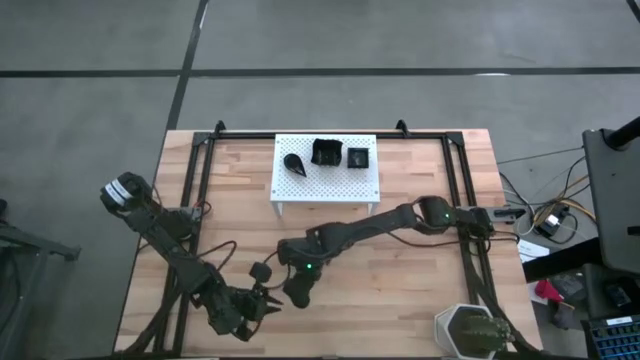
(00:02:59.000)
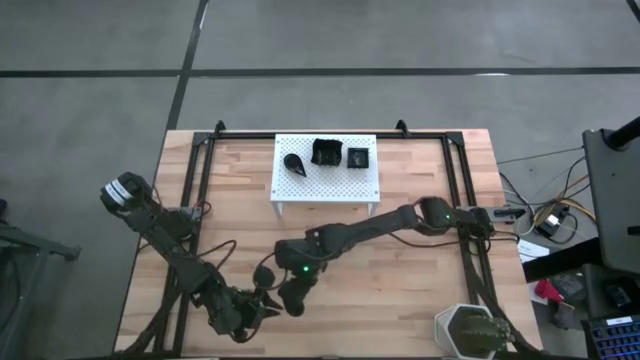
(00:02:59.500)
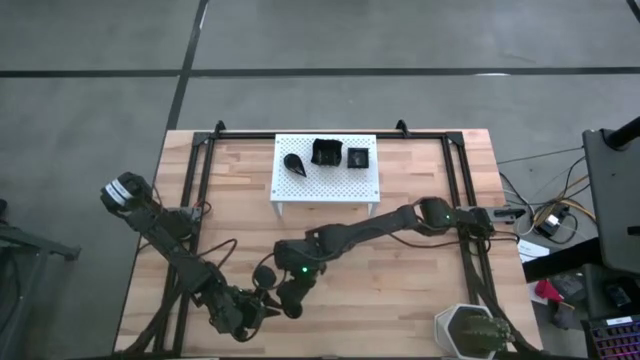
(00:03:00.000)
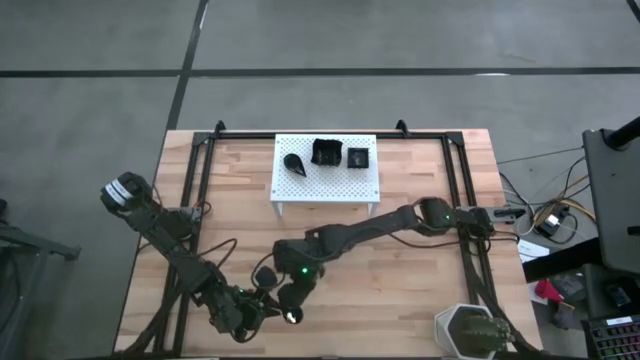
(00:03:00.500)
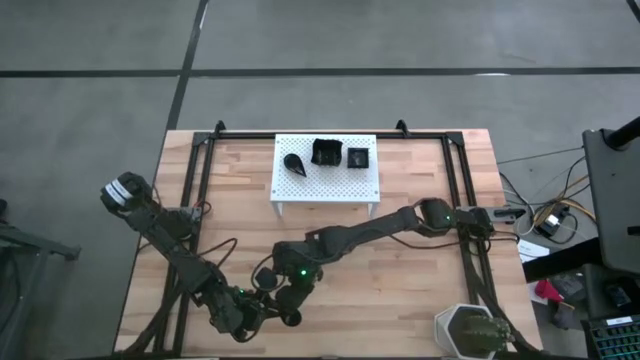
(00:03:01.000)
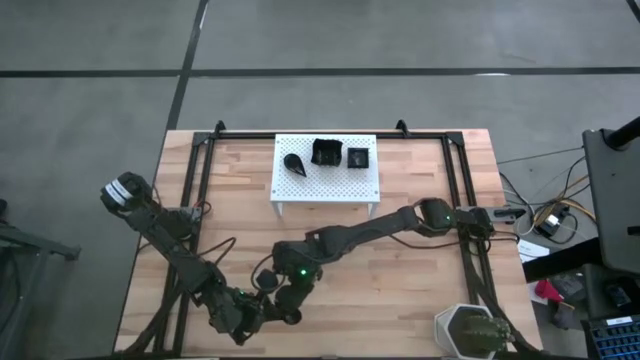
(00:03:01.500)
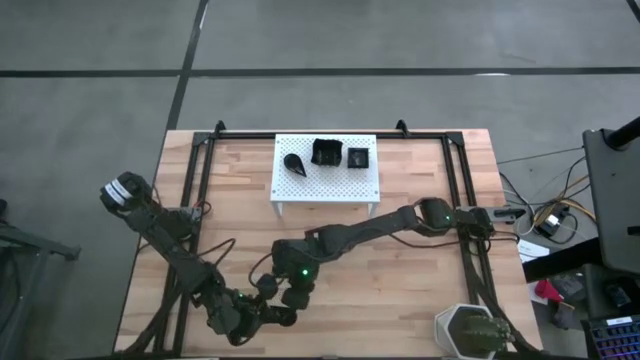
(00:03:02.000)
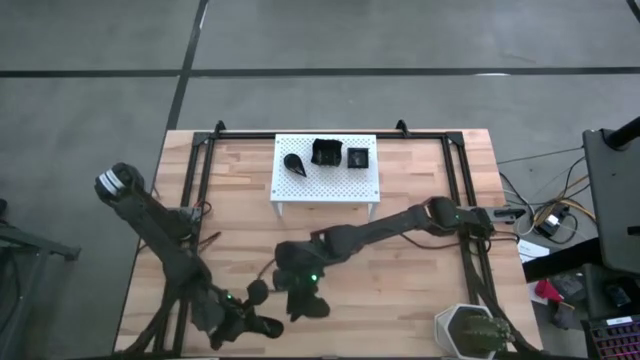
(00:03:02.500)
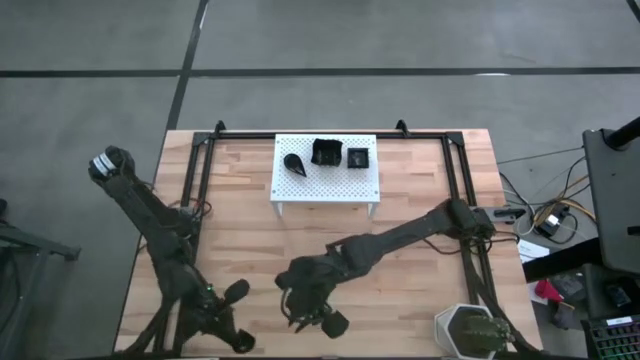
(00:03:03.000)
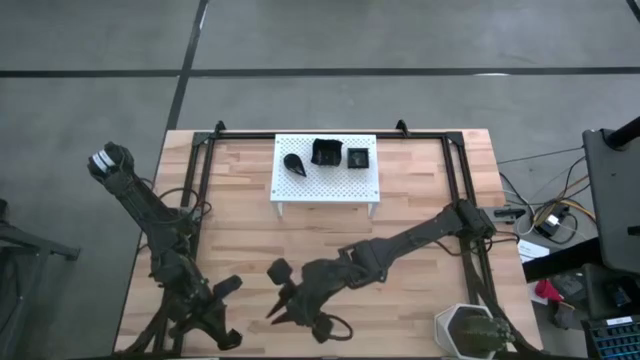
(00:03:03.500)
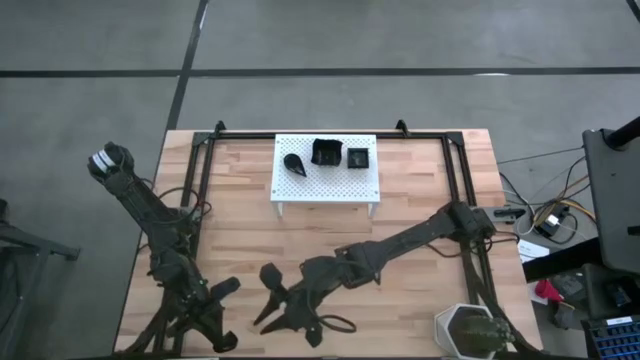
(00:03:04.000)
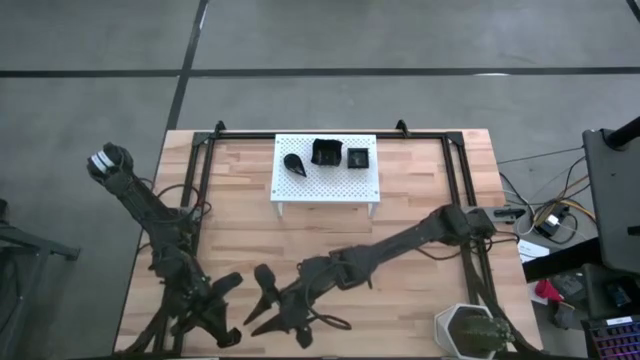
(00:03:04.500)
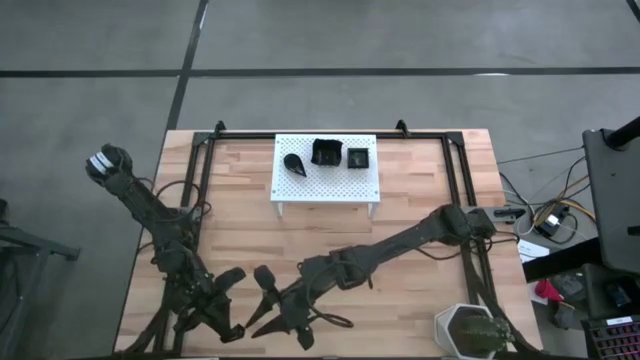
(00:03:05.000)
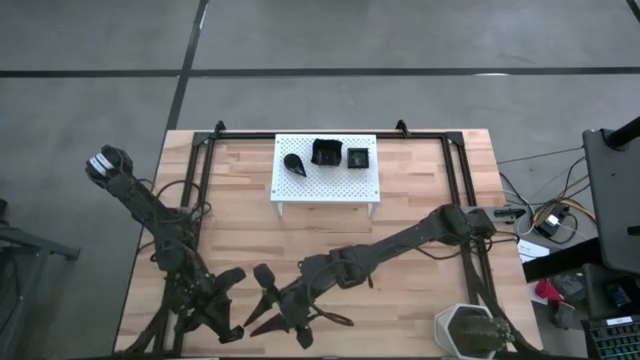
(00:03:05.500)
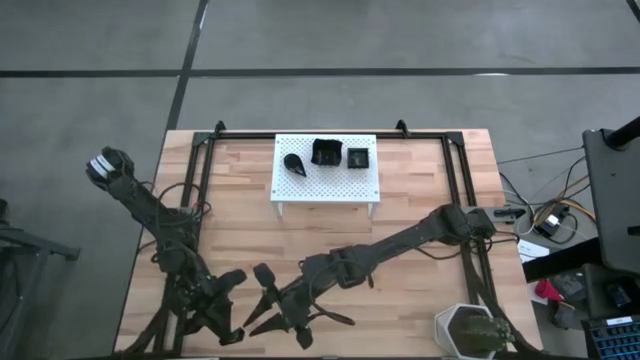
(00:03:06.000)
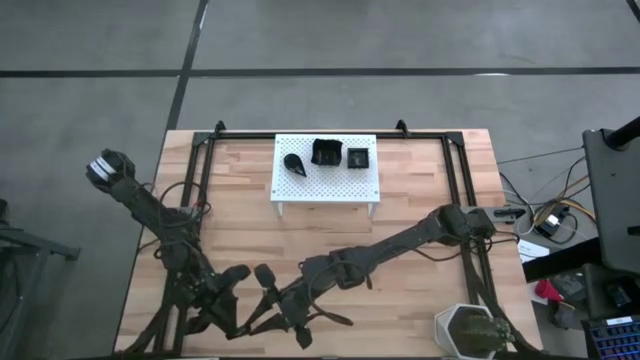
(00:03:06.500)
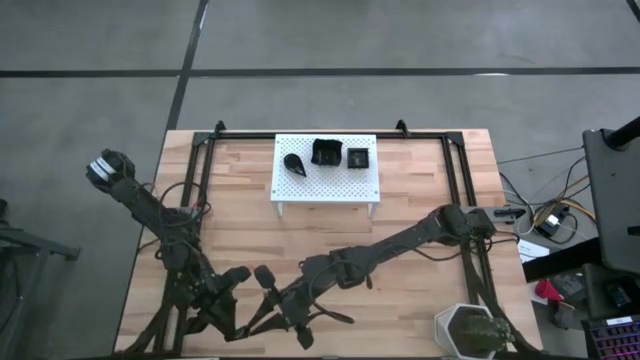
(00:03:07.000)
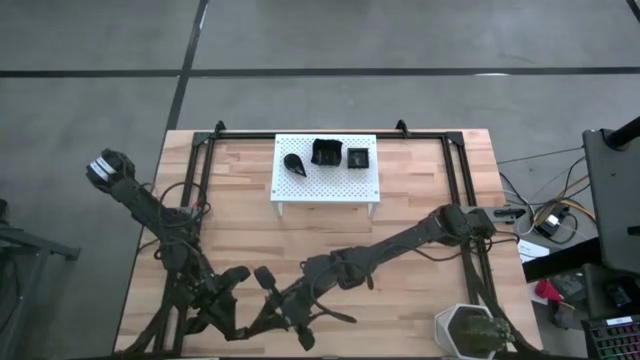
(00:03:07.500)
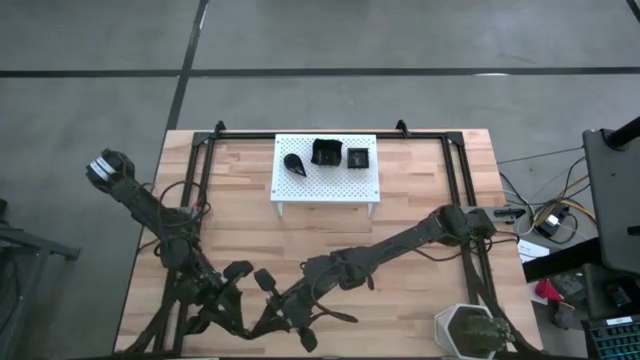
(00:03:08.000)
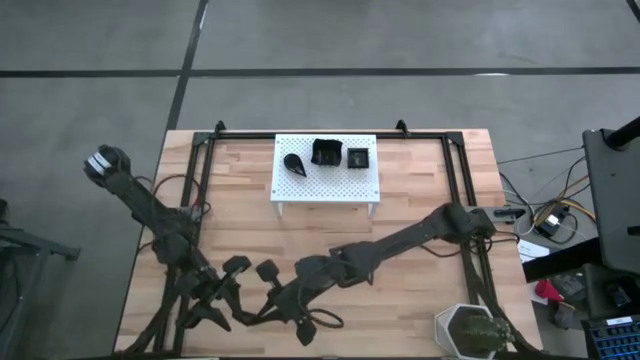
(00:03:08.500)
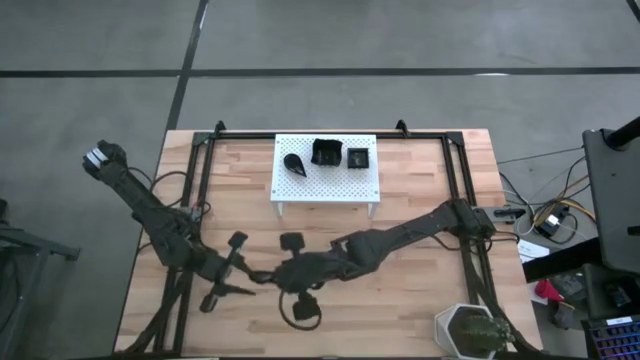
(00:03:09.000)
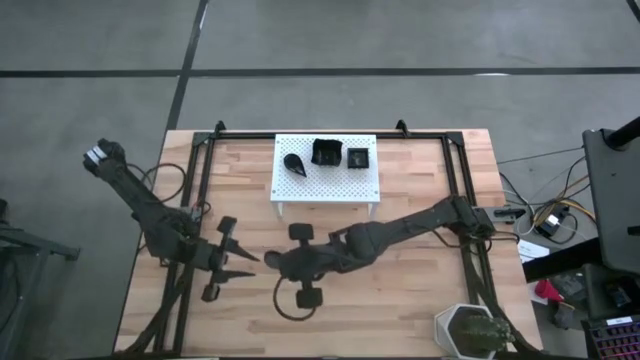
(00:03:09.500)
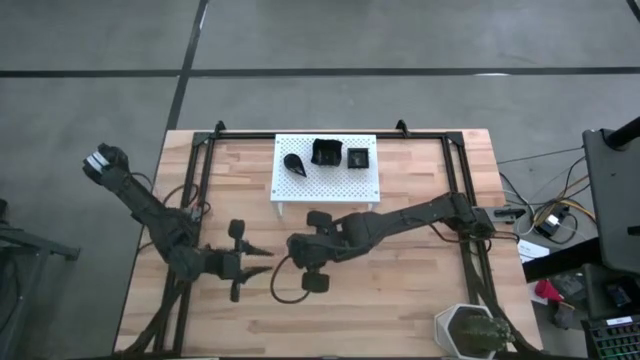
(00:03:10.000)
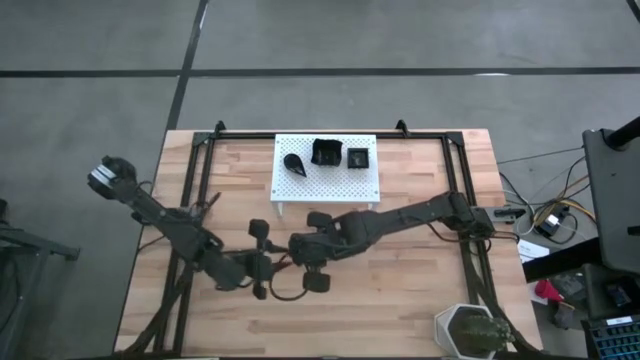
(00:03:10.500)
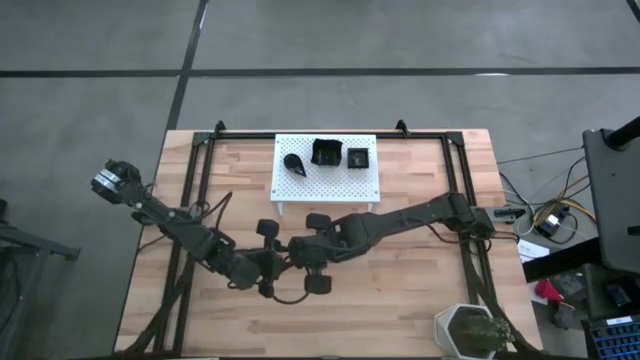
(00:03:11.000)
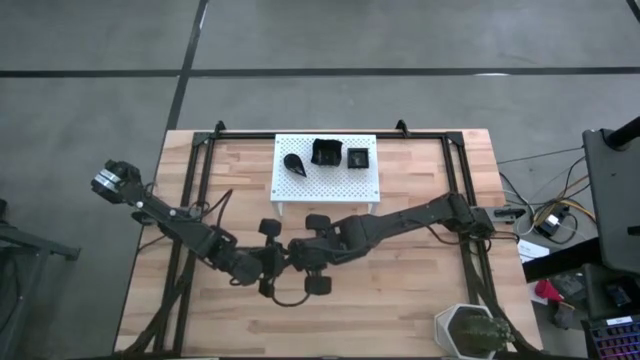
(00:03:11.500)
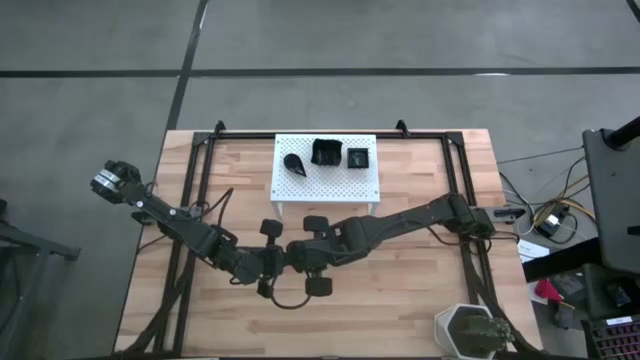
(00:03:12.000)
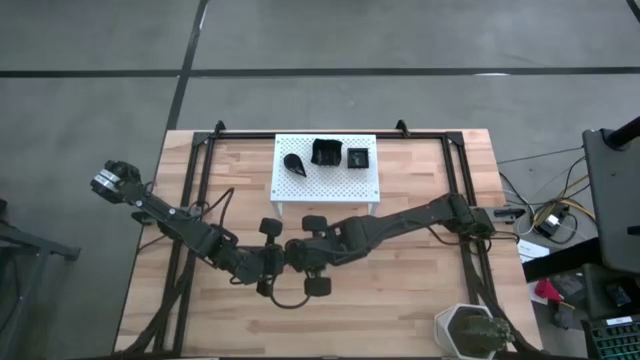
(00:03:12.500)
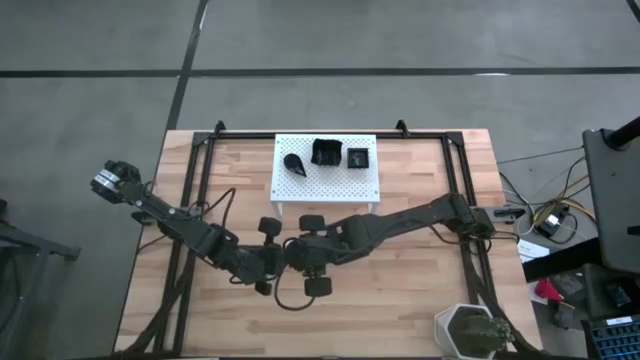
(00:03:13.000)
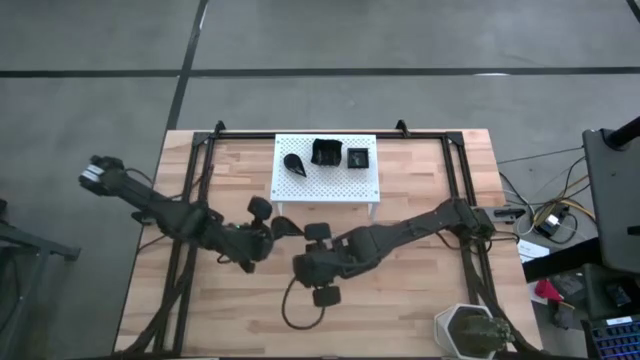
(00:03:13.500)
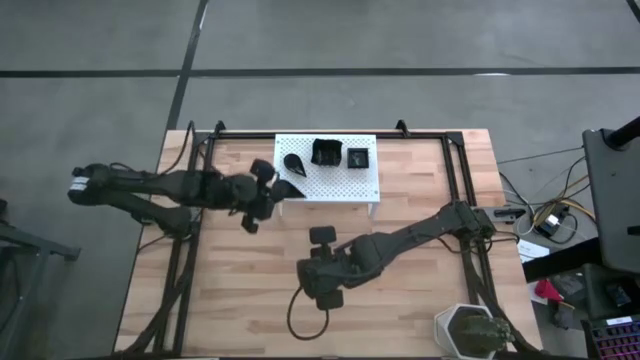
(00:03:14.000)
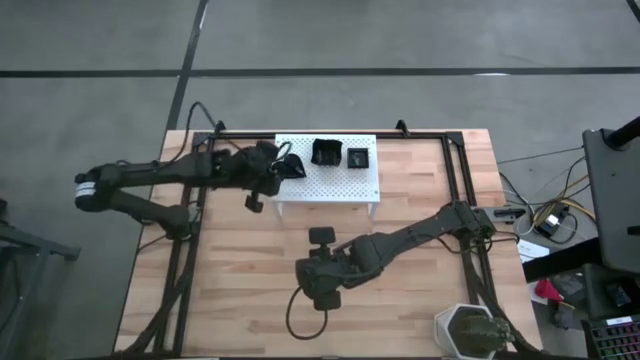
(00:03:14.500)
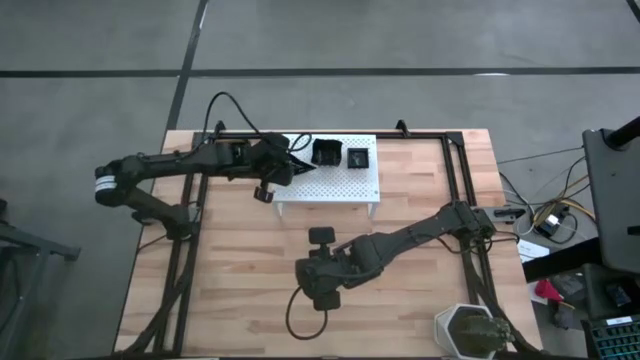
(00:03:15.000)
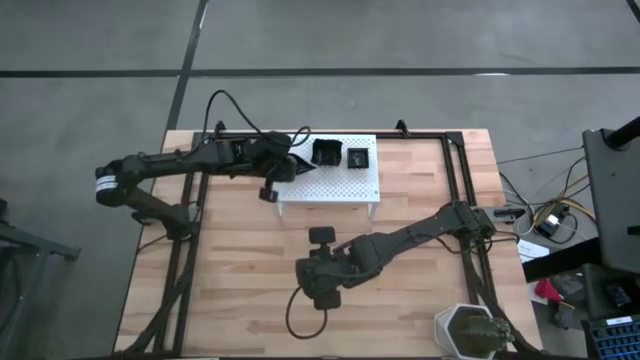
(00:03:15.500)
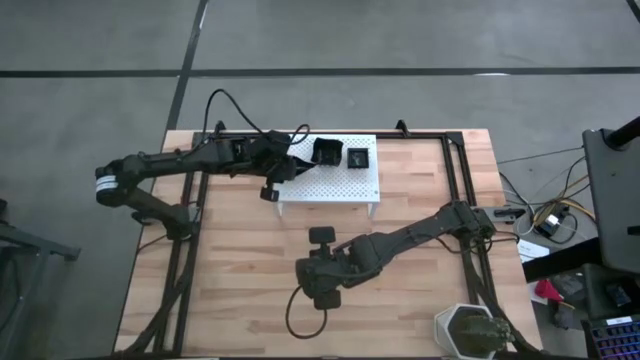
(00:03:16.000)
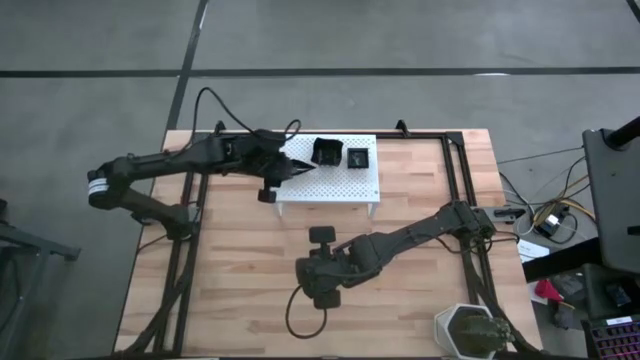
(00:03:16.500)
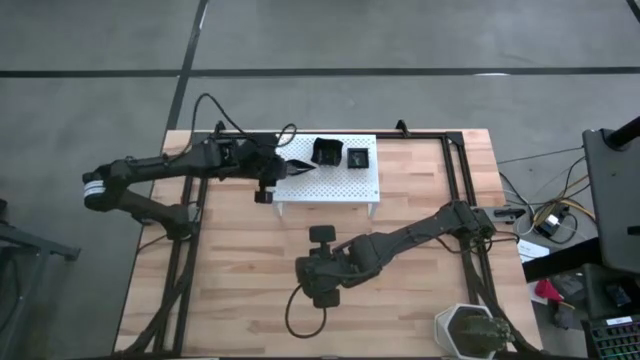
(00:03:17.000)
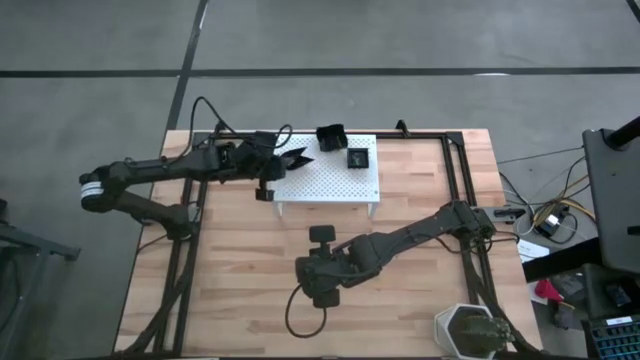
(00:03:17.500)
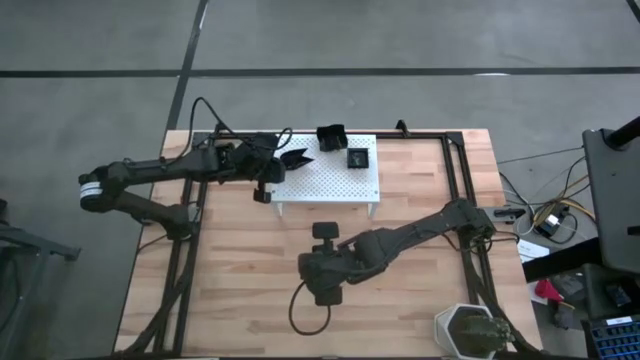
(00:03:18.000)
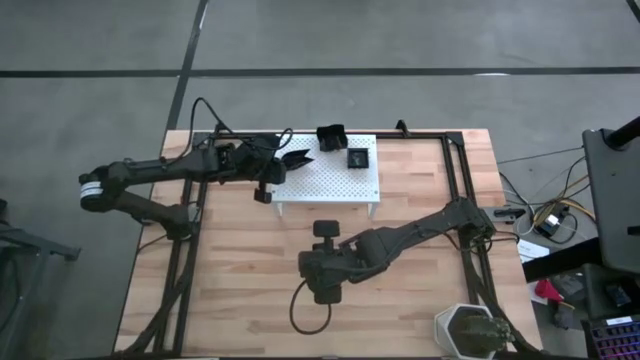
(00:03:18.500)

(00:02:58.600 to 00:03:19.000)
Task: Pick & Place Mini shaped plates
Stack the drop shaped plate on top of the drop shaped plate on the shelf

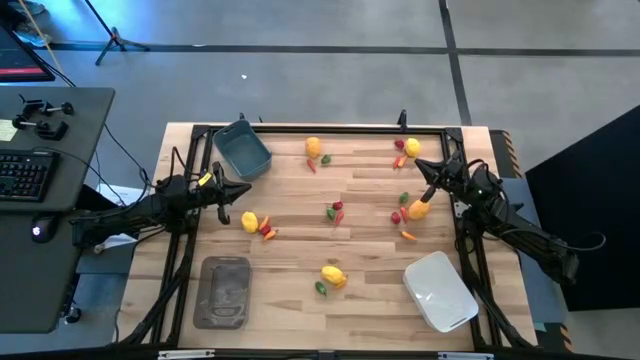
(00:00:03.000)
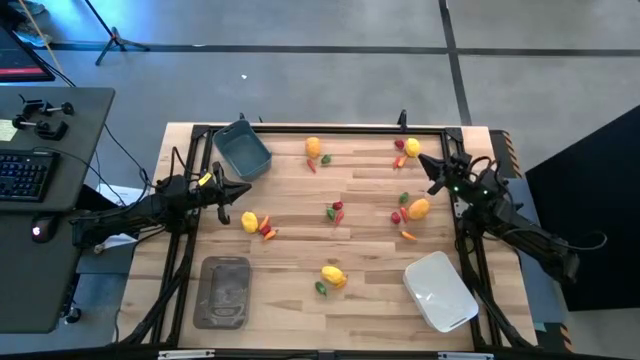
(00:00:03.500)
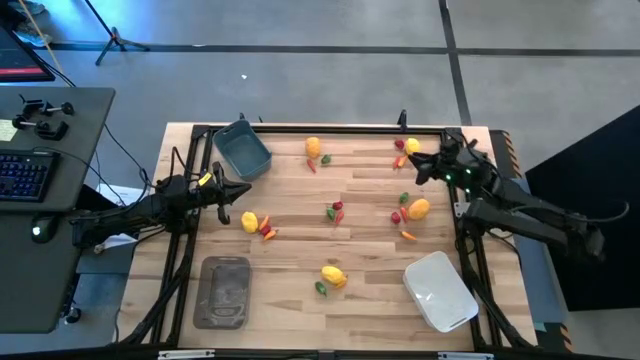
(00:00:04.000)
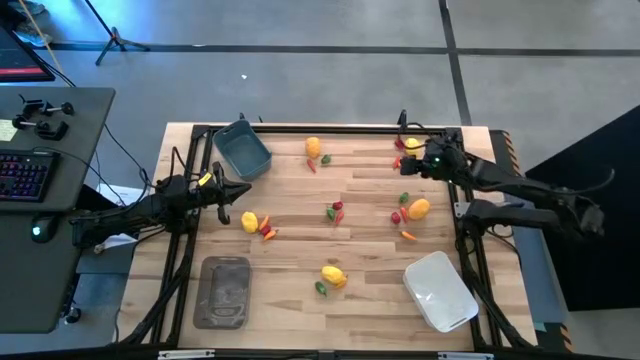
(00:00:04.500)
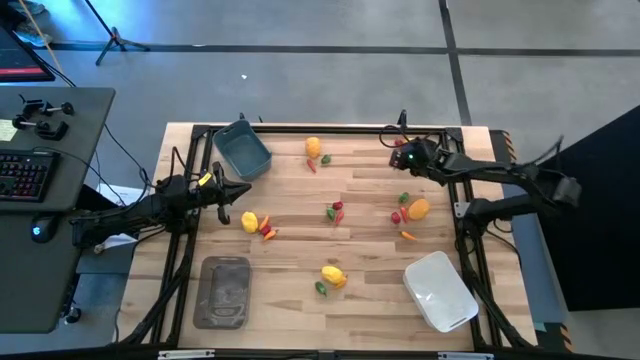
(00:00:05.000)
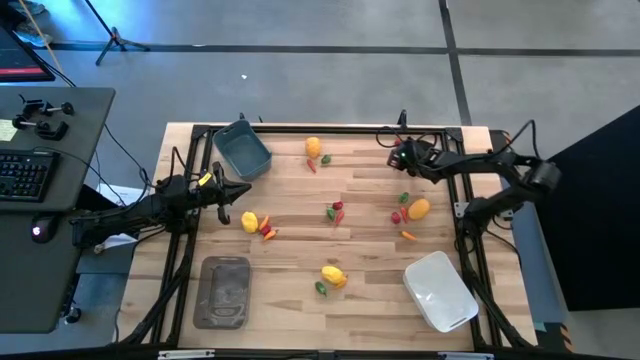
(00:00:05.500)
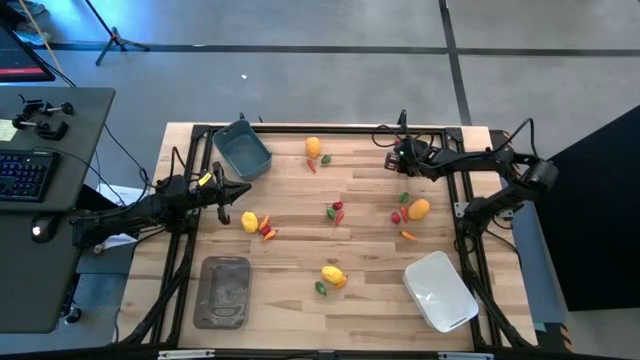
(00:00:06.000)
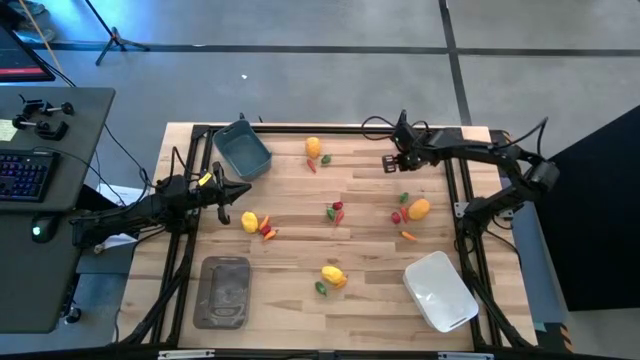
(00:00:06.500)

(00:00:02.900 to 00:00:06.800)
Task: Sort produce into baskets
Put the light orange chilli pepper into the white bin
